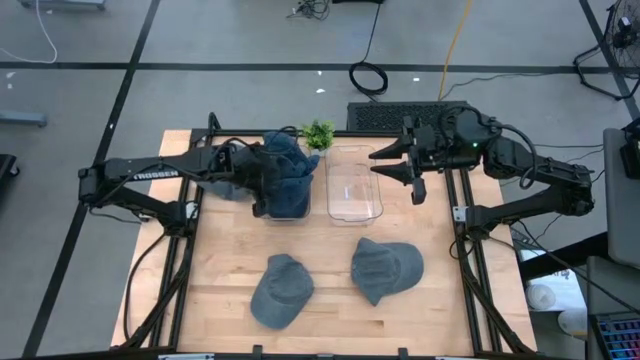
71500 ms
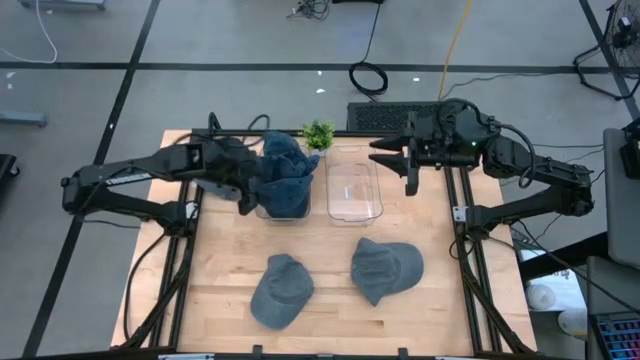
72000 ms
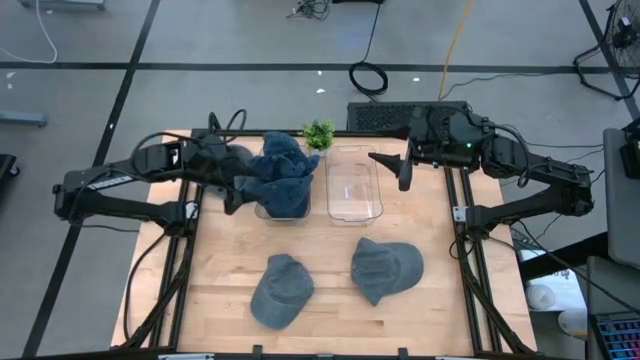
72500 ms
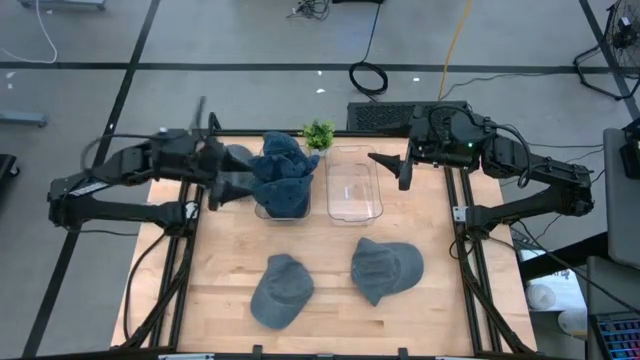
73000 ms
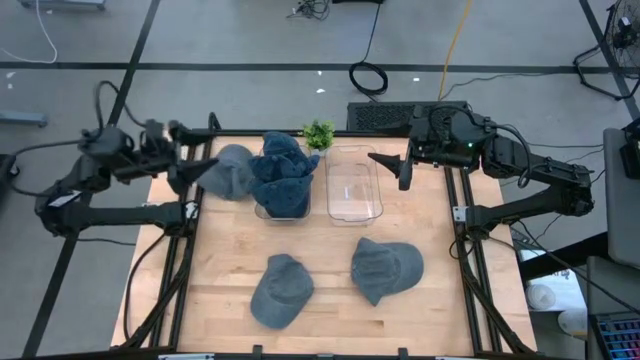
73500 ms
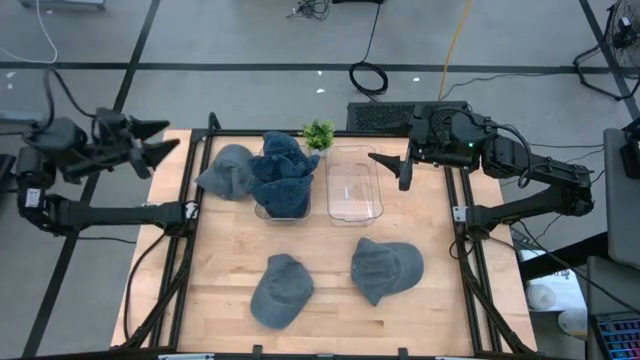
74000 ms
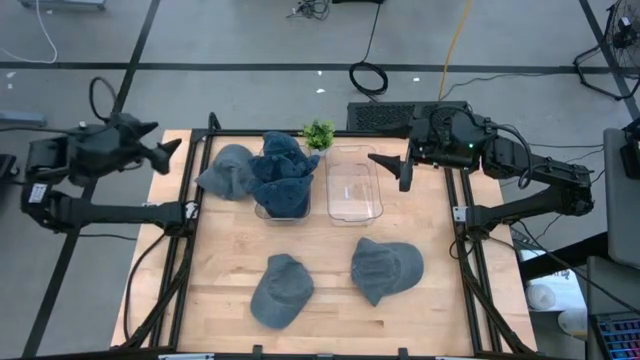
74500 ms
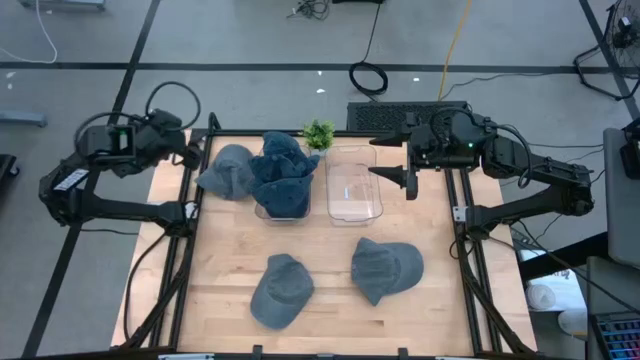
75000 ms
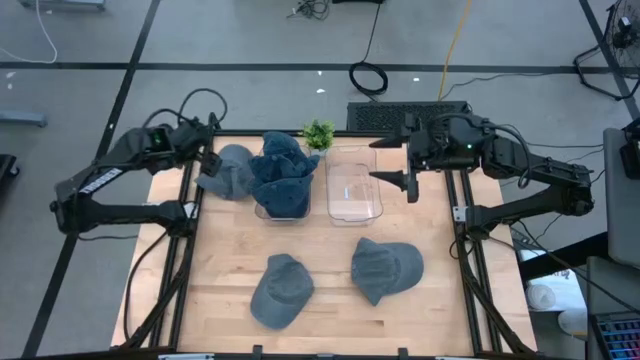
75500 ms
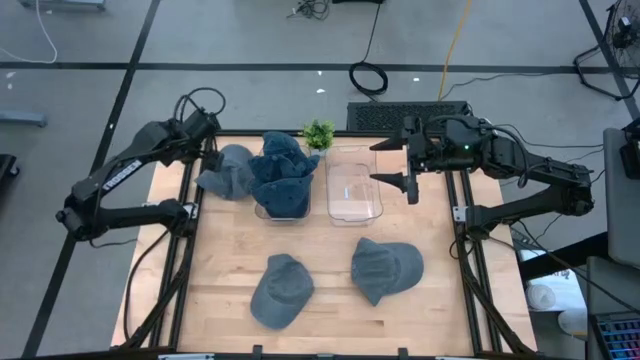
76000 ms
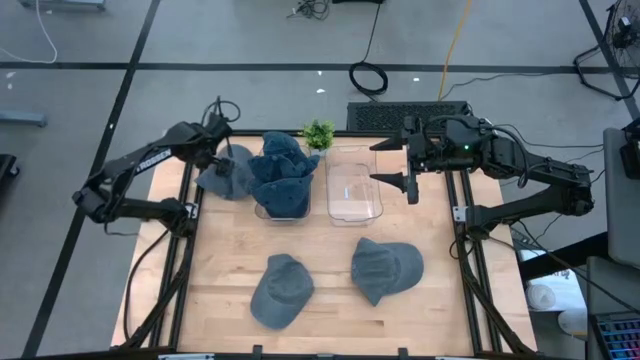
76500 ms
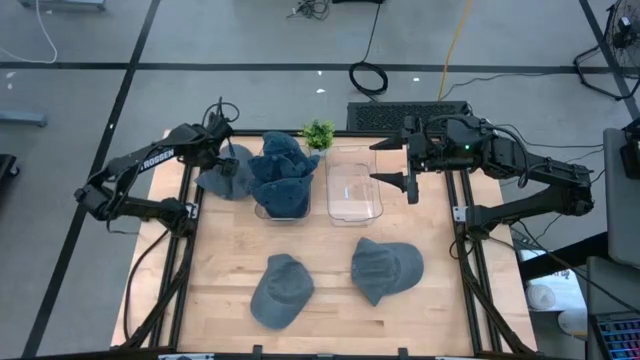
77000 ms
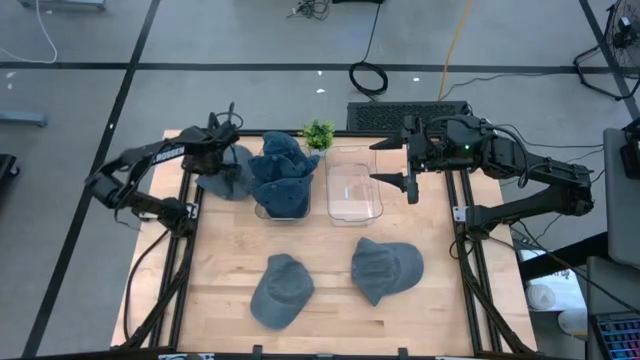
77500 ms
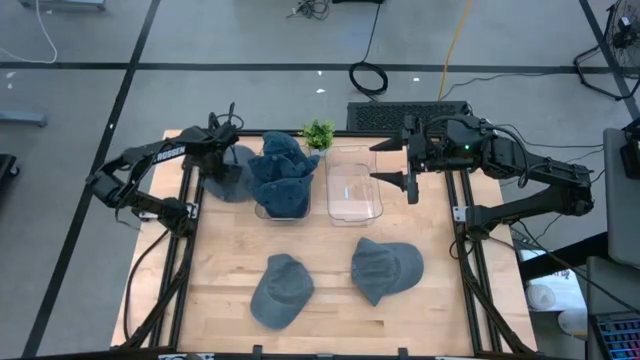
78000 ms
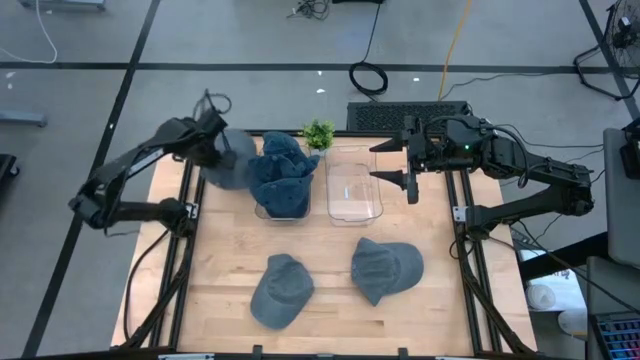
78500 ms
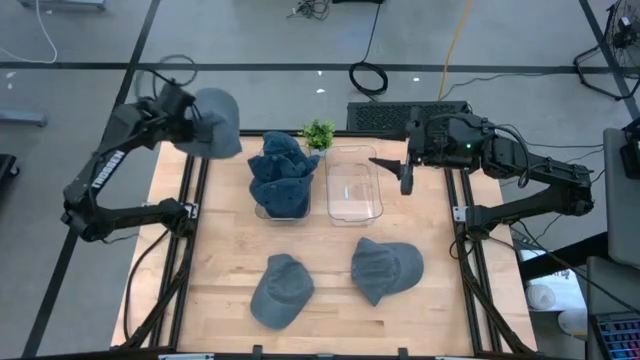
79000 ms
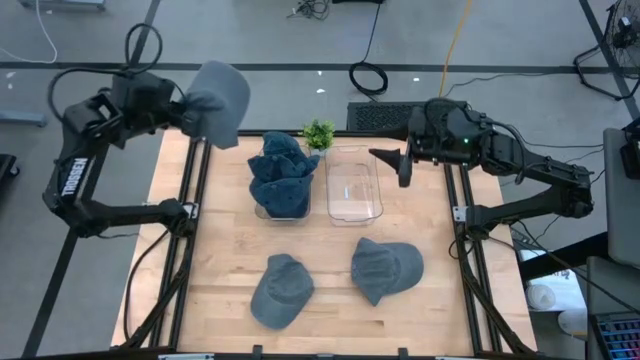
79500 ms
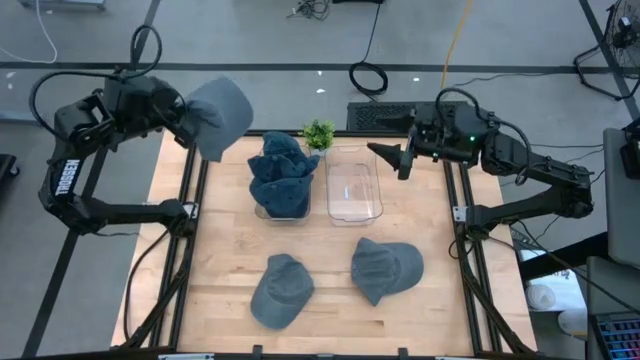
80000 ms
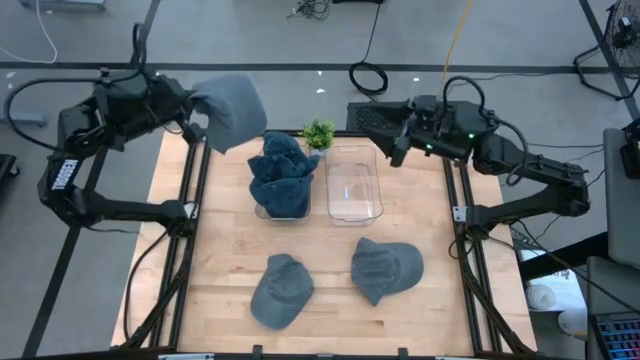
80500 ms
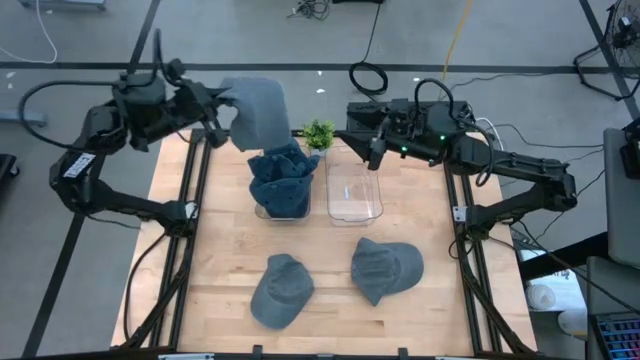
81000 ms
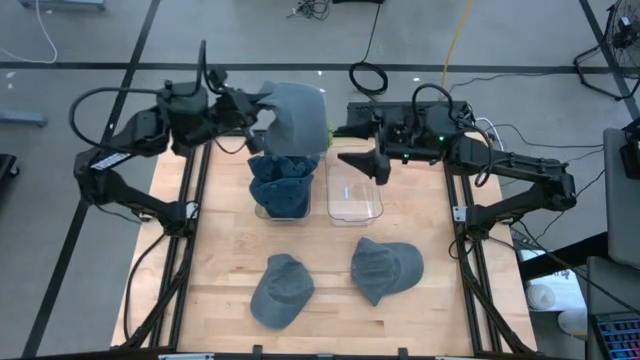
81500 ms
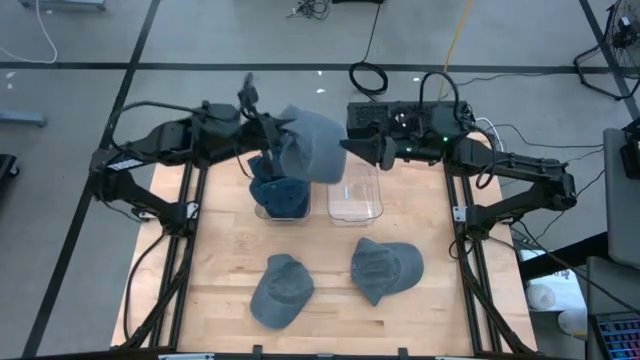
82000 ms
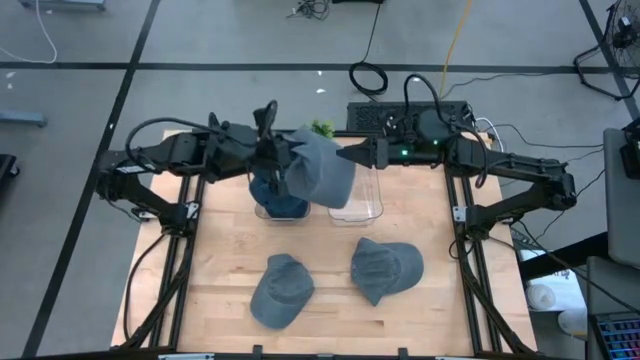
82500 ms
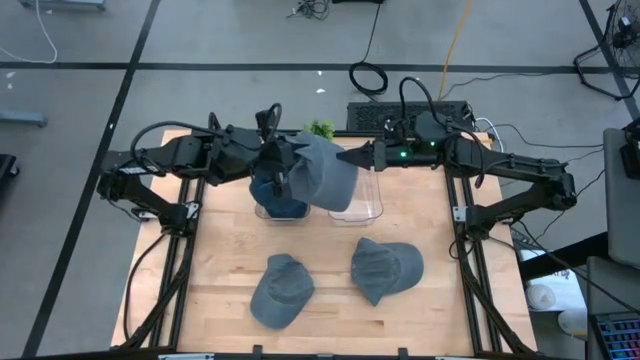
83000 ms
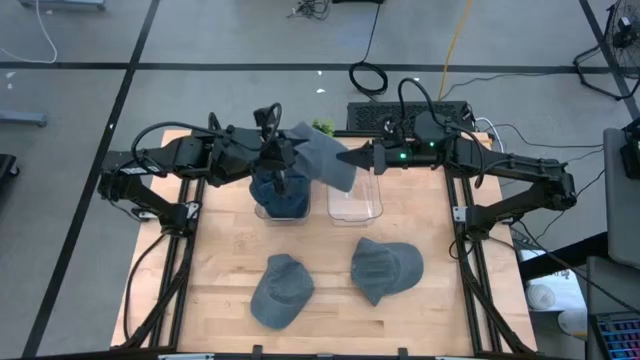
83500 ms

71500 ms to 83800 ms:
Task: Pick & Place hat
Put the top gray cap into the right transparent bin

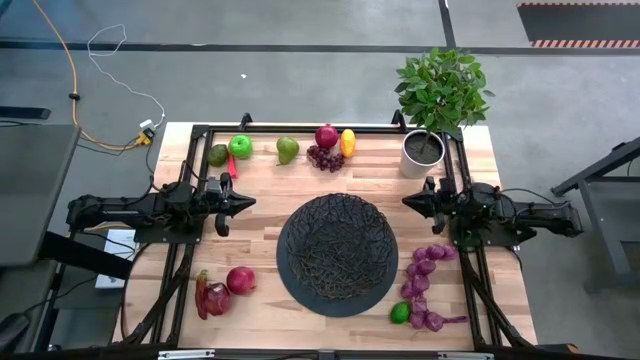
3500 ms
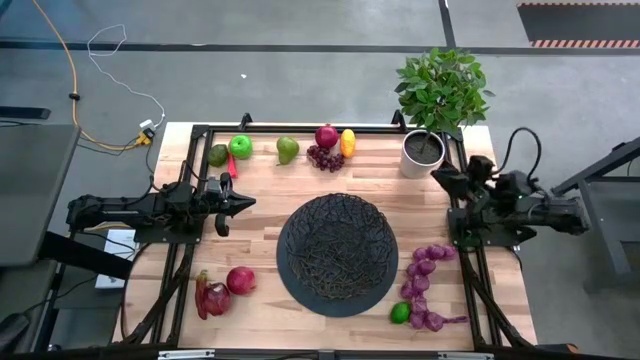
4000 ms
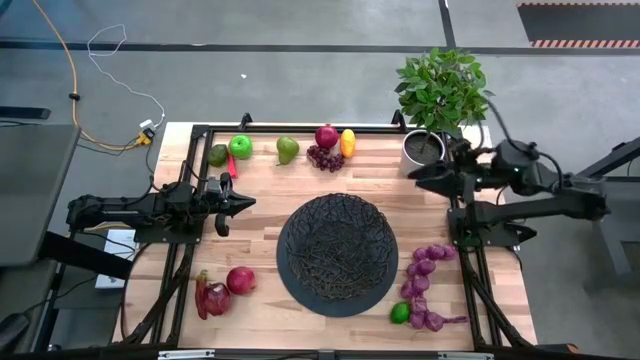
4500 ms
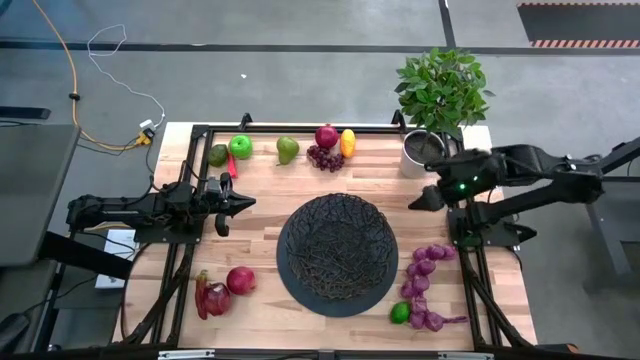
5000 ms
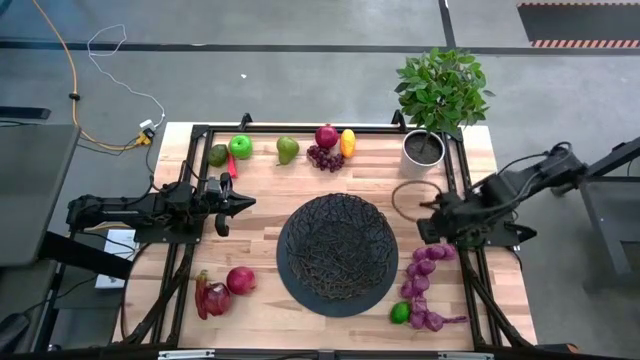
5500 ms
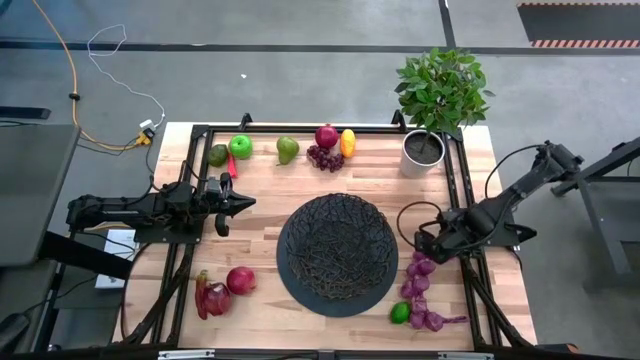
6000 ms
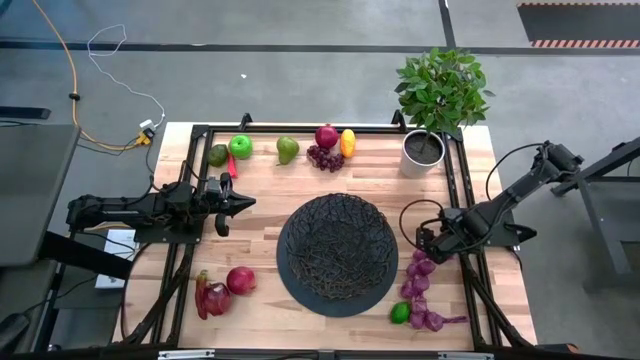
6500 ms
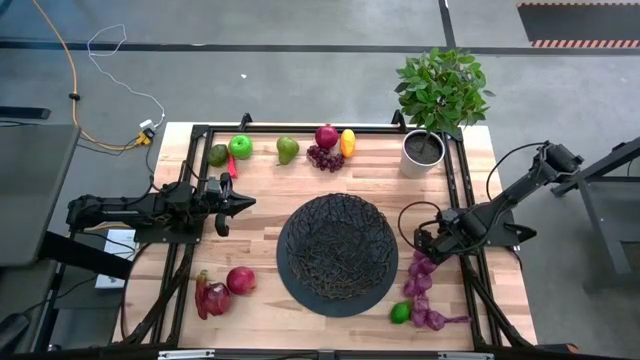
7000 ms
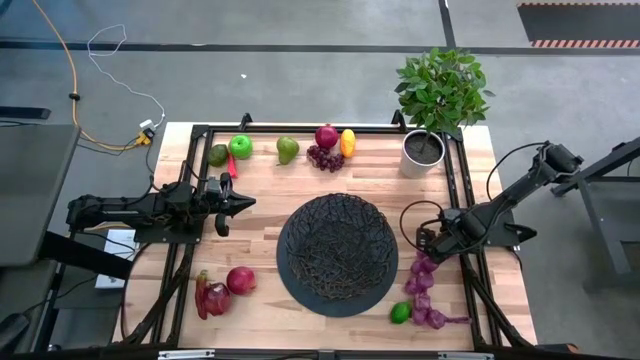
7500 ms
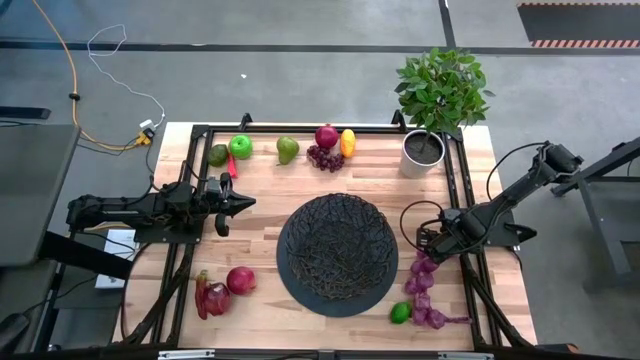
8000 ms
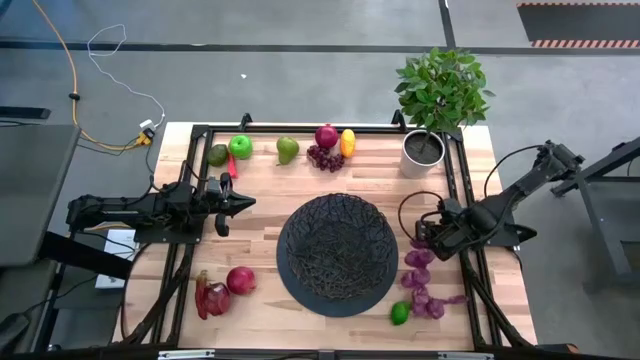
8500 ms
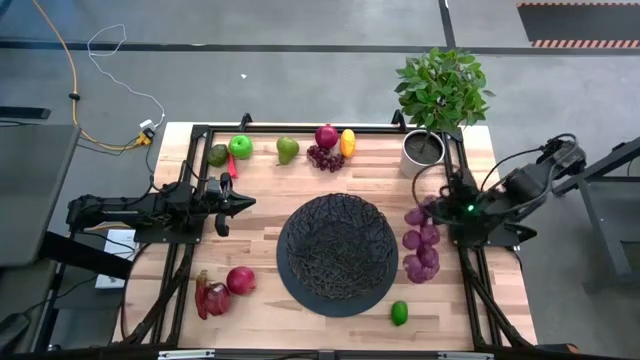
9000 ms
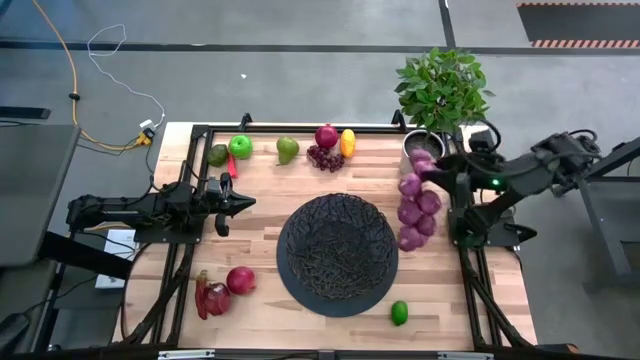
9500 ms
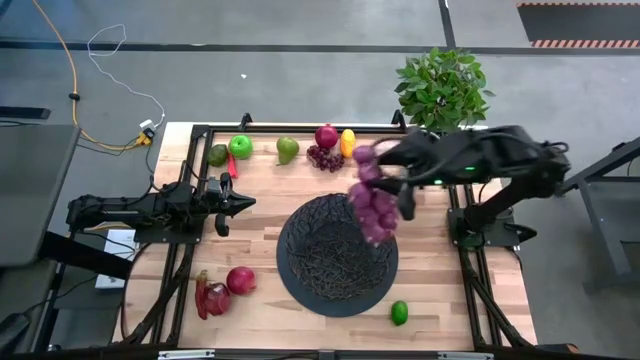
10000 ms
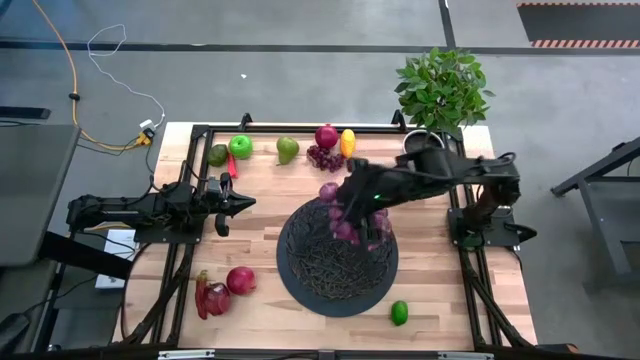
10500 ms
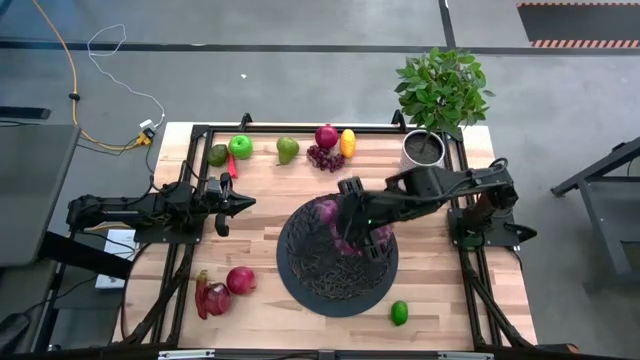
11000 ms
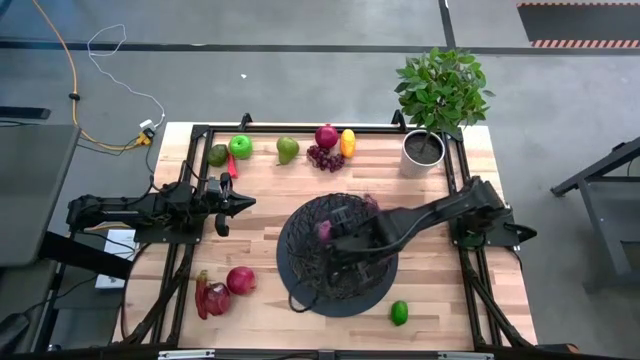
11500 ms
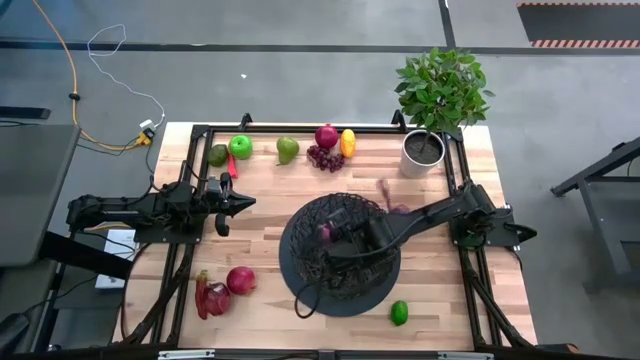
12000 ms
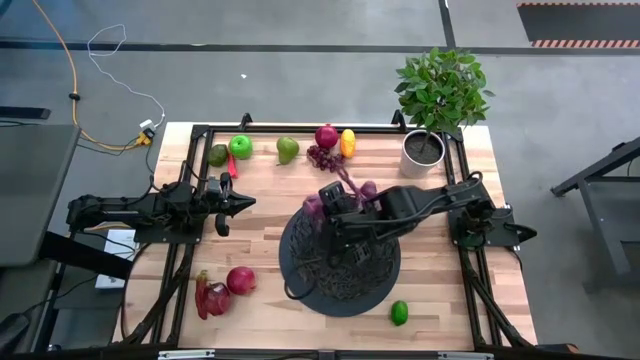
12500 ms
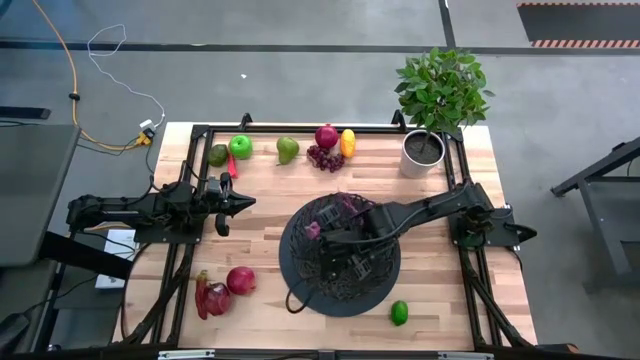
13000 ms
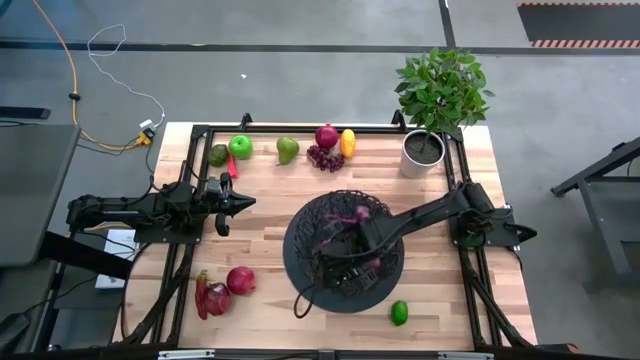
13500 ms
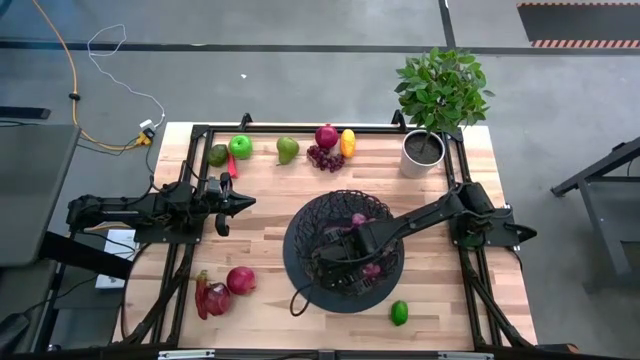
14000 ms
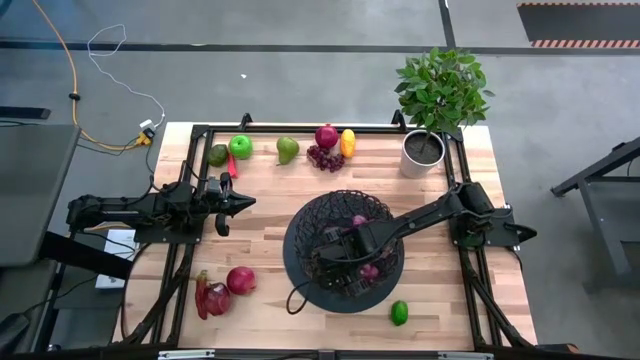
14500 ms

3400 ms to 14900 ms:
Task: Build produce basket
Put the purple garlic into the basket
